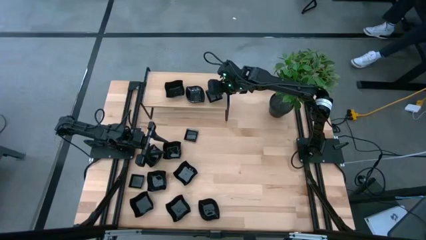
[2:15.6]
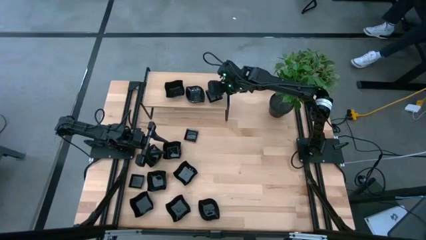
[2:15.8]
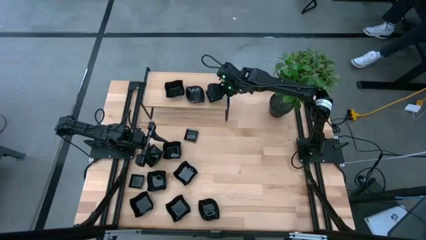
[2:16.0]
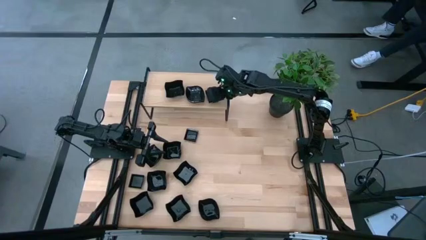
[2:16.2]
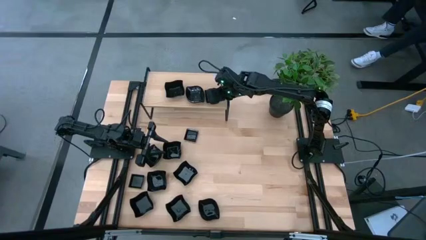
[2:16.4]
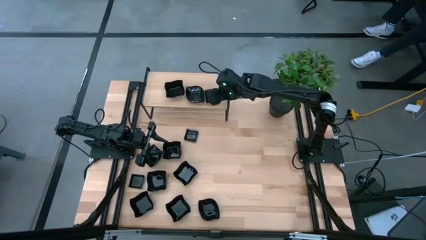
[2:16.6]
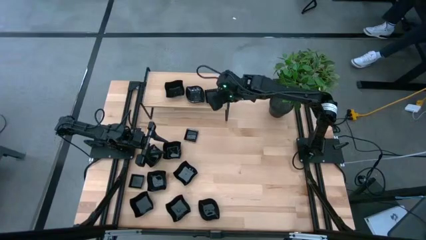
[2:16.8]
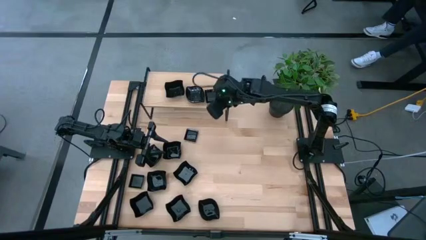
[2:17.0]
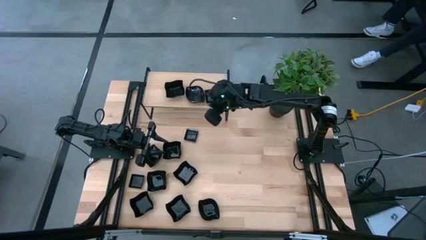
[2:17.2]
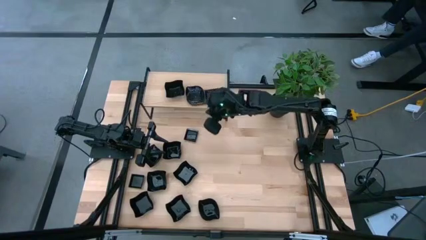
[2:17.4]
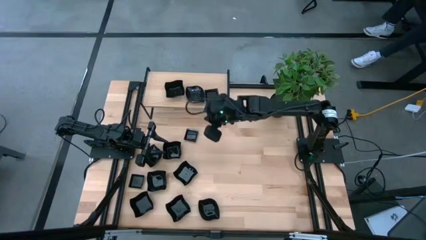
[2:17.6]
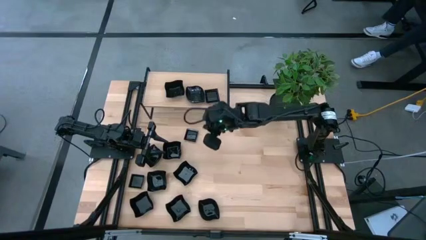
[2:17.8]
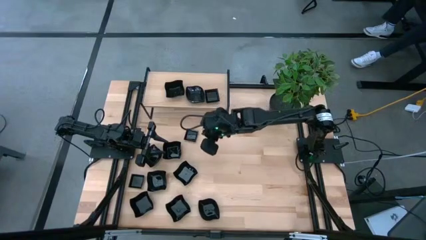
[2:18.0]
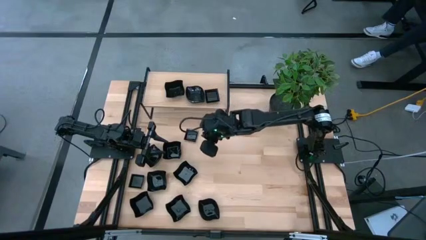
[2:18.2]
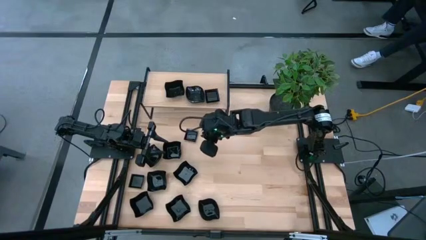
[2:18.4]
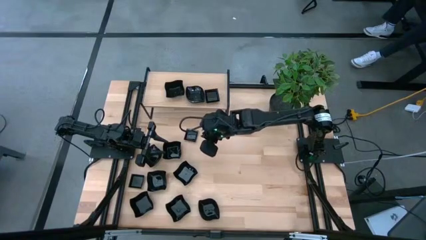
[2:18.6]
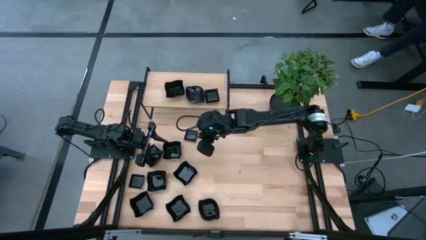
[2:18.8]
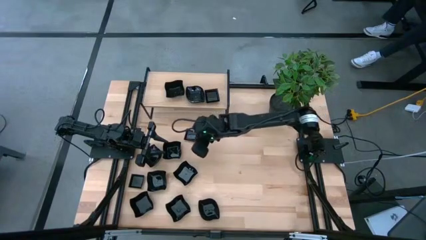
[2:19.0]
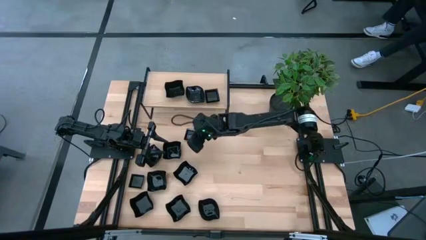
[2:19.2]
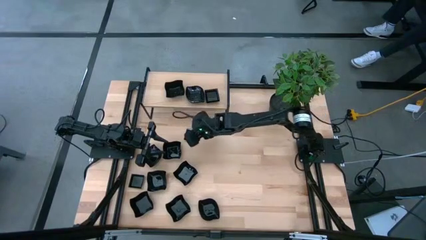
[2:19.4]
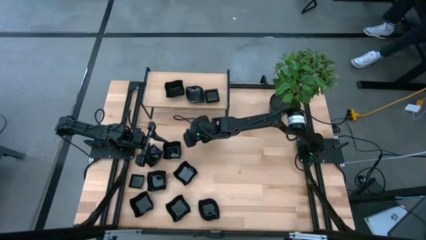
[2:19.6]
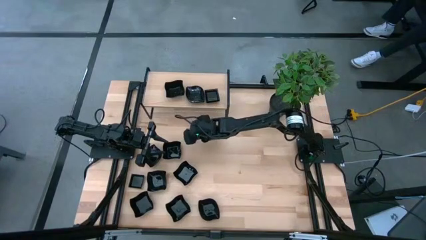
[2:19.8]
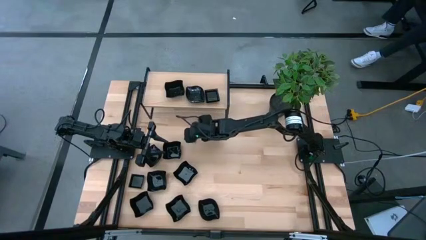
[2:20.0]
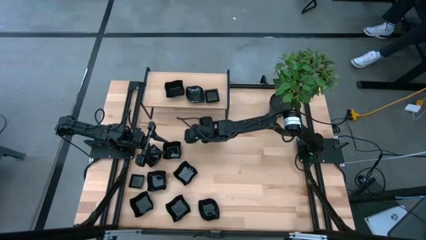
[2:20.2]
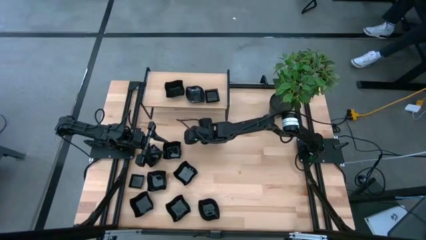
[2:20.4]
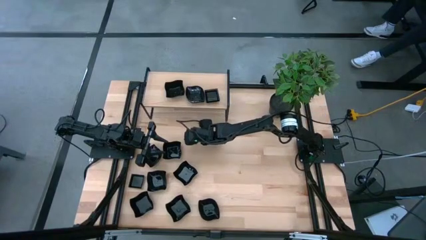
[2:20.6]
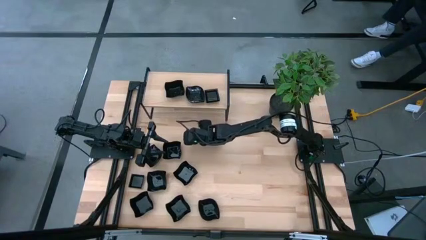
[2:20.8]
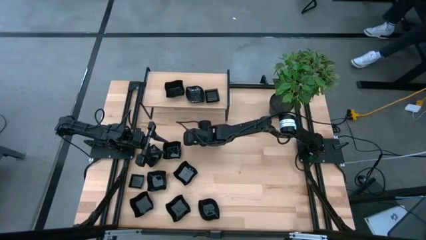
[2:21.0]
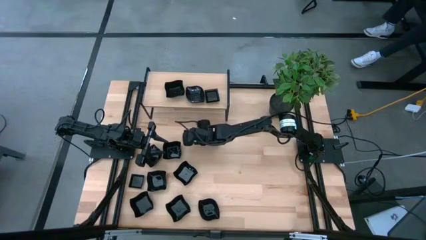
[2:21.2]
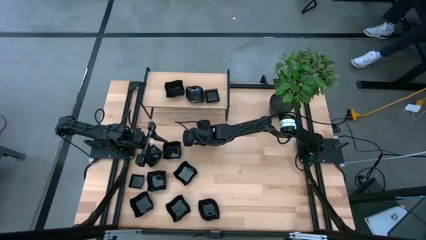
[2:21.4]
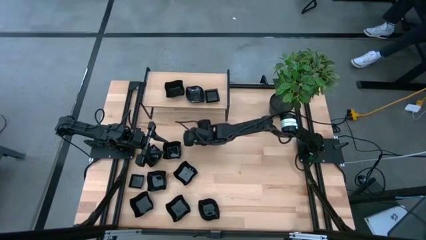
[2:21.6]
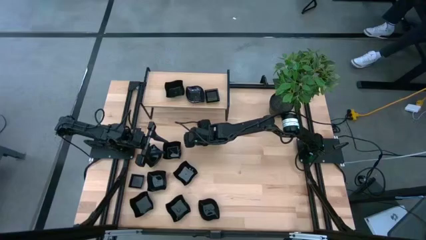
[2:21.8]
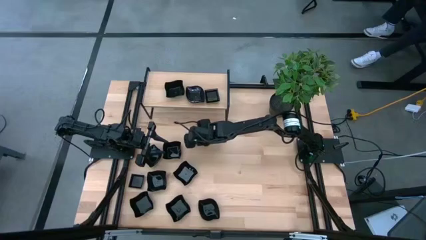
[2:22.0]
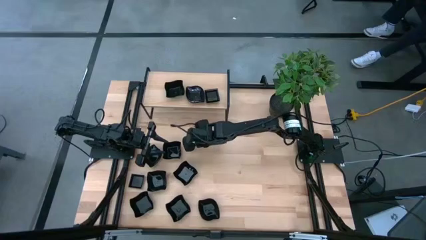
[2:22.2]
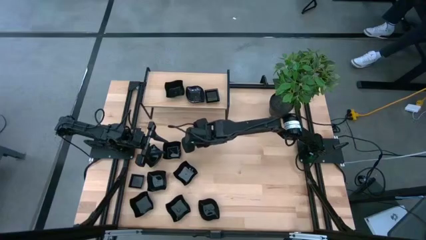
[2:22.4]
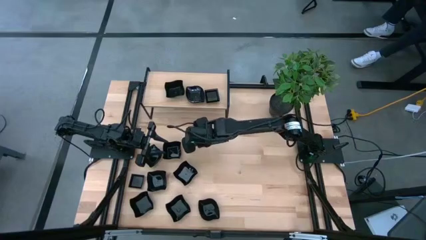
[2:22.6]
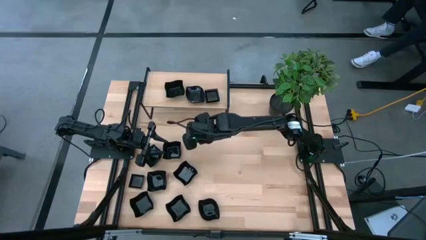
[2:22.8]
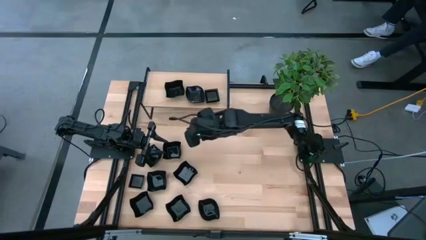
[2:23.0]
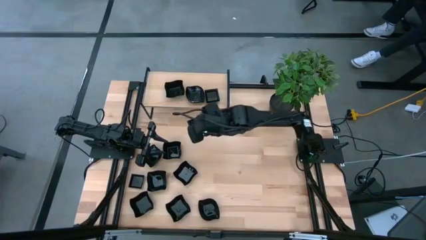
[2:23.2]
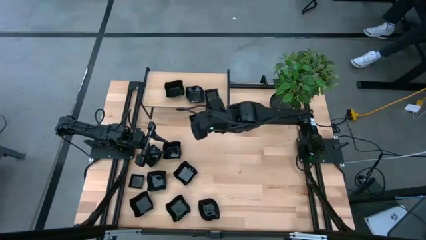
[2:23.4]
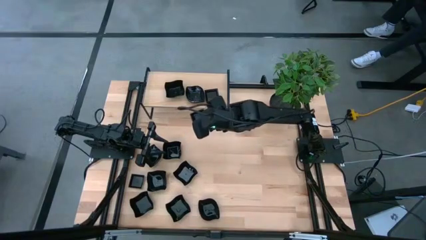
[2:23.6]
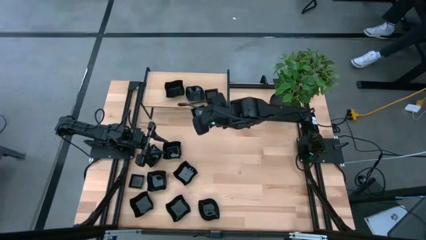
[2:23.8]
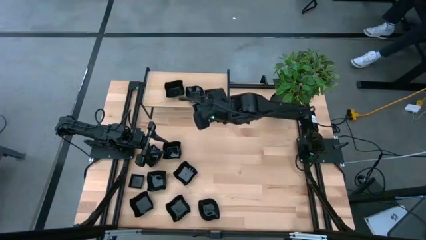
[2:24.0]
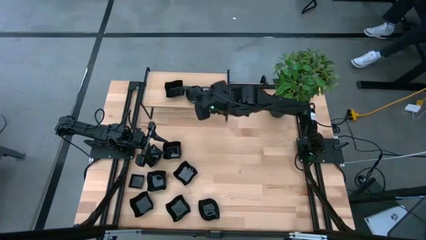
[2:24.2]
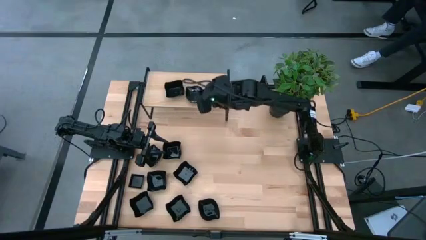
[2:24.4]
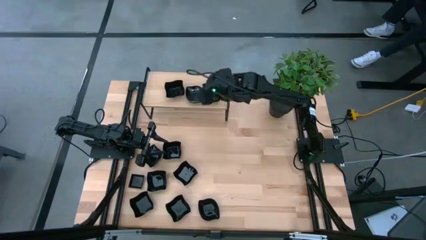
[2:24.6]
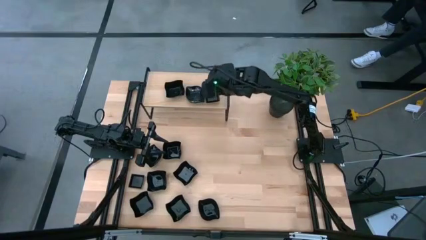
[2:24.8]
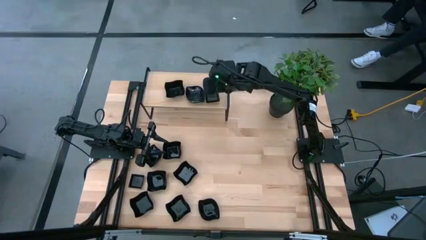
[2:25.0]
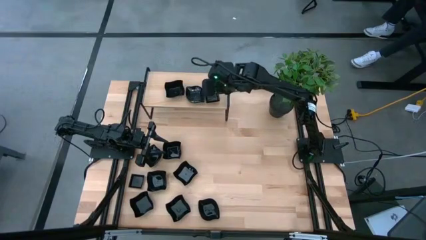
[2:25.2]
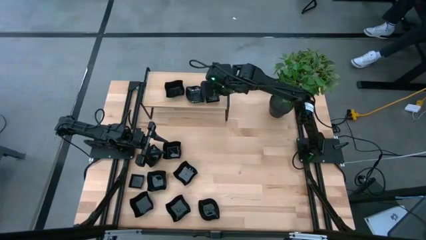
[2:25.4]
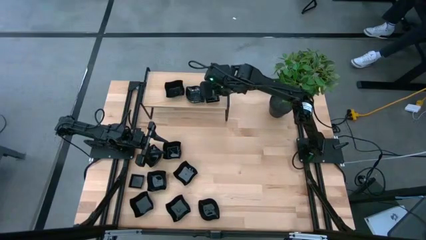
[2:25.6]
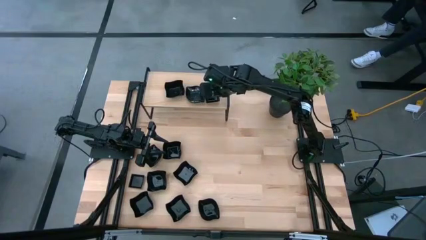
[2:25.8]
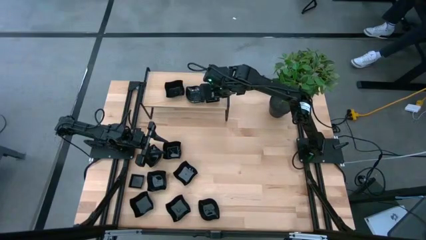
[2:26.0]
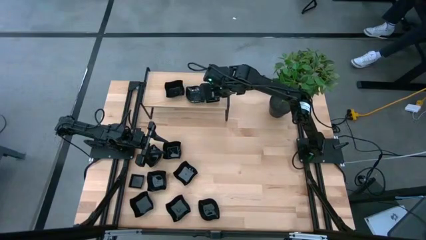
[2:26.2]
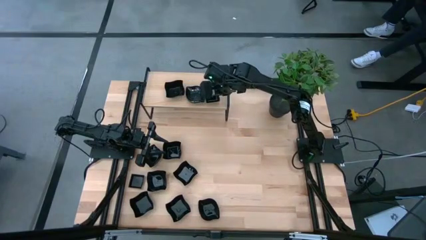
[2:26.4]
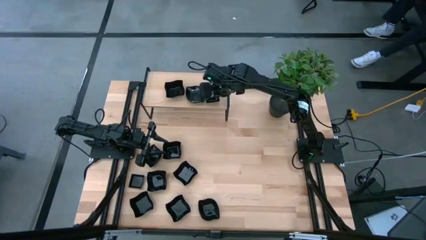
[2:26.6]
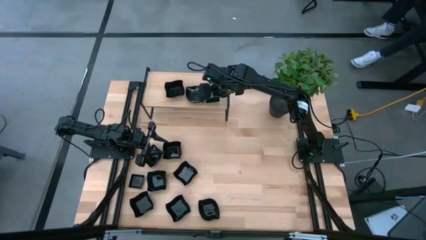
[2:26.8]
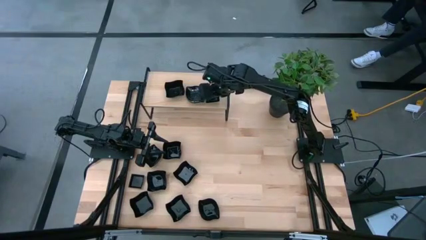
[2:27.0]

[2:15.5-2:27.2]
Task: Pick & Place Mini shaped plates
Stack the square plate on top of the square plates on the shelf

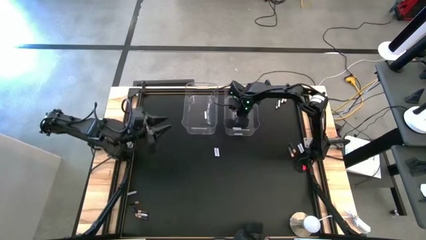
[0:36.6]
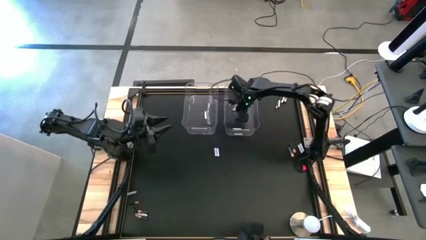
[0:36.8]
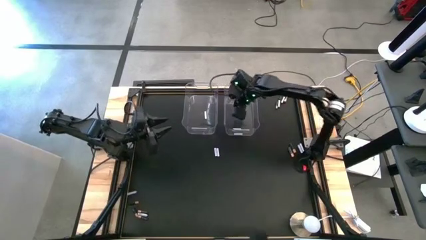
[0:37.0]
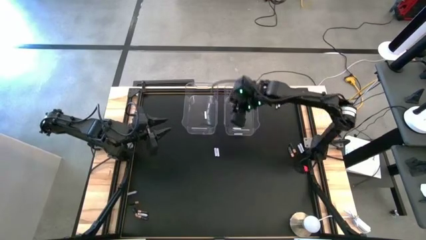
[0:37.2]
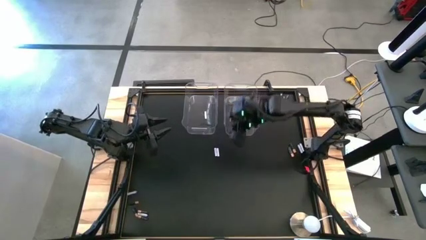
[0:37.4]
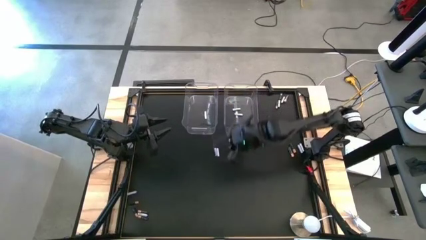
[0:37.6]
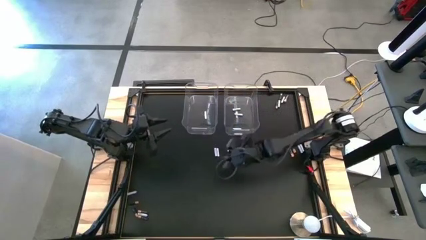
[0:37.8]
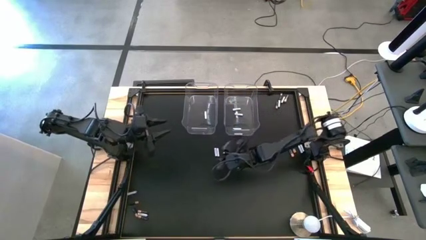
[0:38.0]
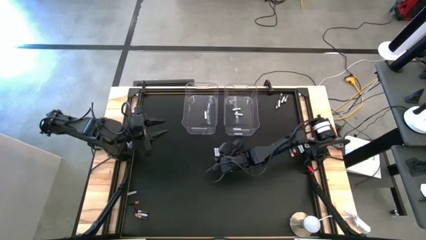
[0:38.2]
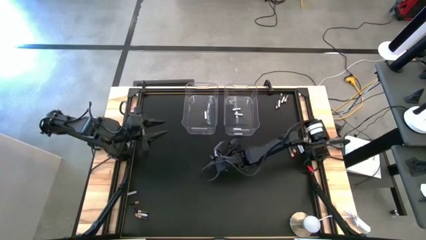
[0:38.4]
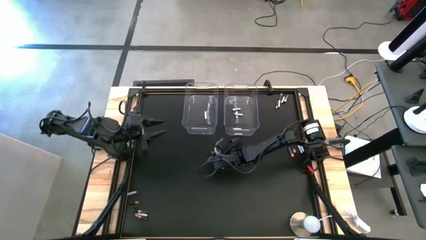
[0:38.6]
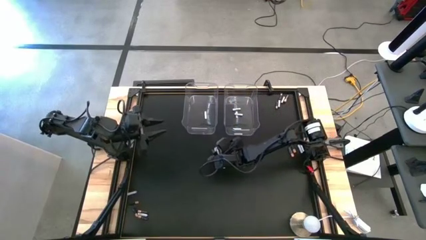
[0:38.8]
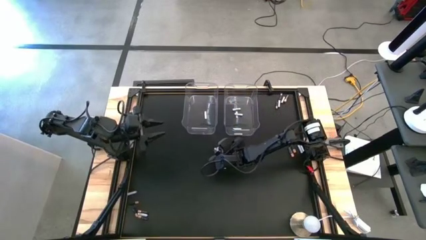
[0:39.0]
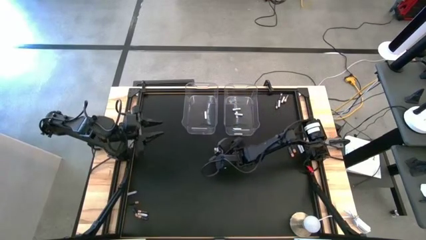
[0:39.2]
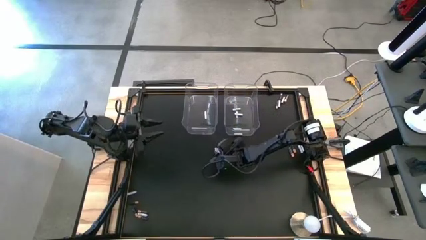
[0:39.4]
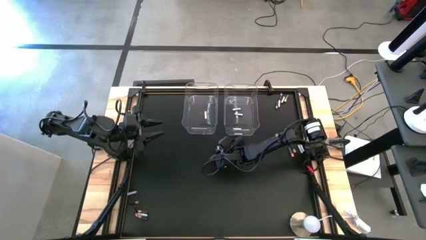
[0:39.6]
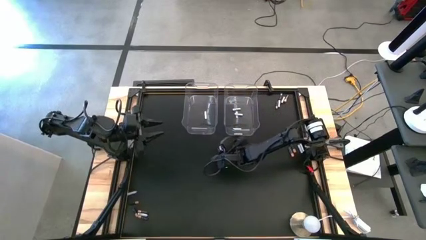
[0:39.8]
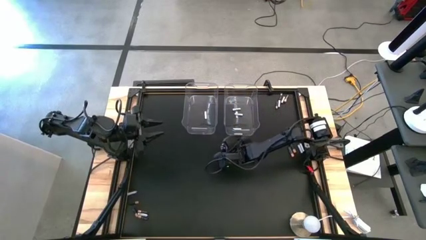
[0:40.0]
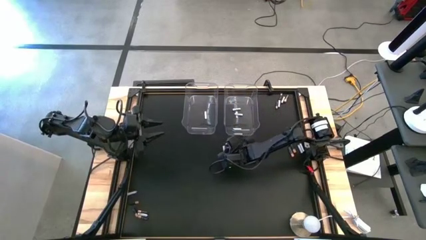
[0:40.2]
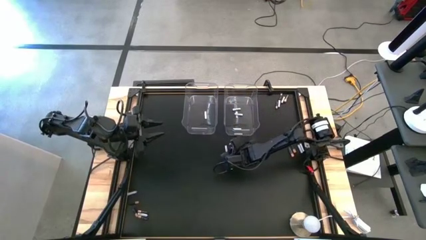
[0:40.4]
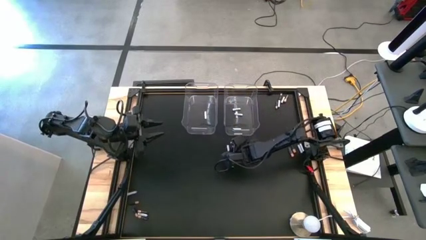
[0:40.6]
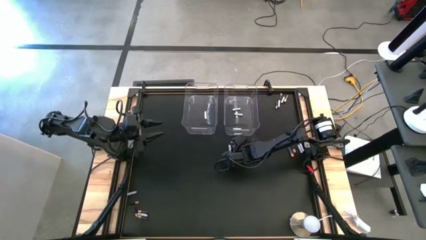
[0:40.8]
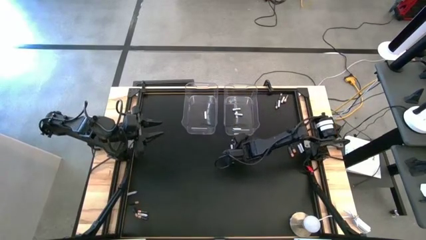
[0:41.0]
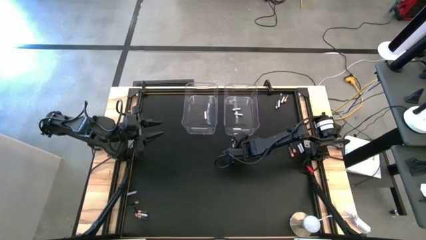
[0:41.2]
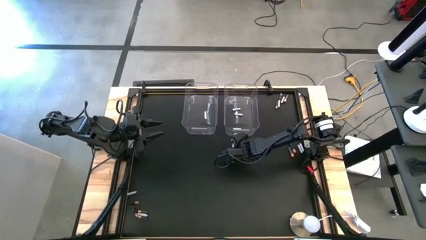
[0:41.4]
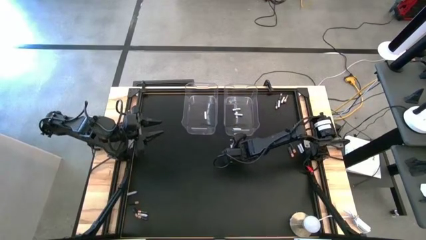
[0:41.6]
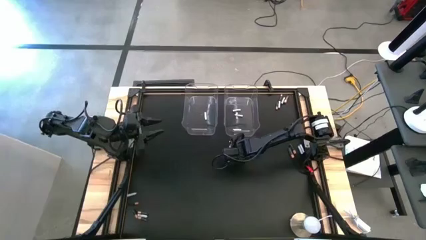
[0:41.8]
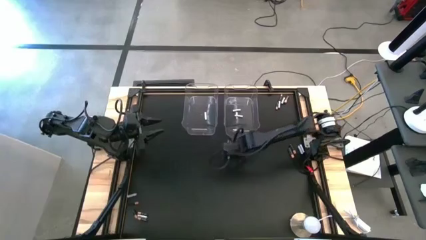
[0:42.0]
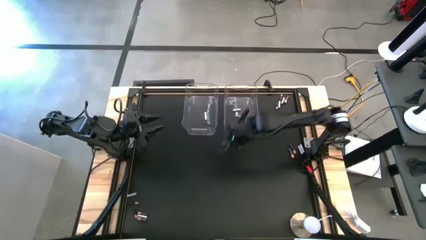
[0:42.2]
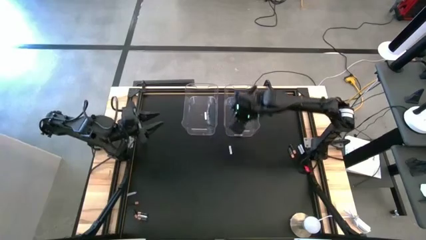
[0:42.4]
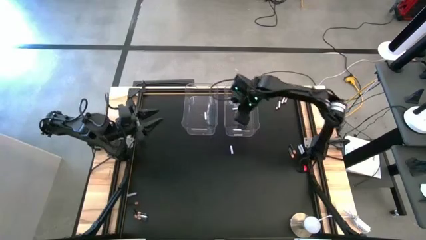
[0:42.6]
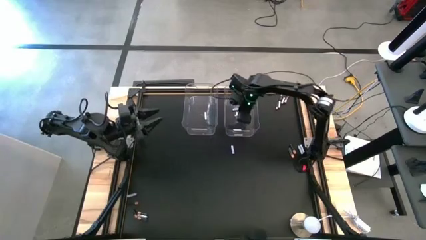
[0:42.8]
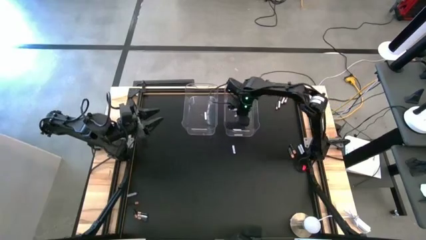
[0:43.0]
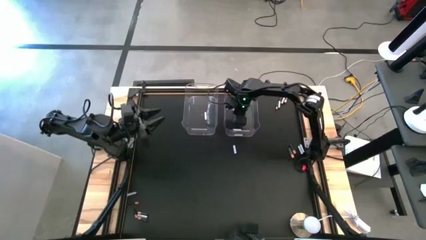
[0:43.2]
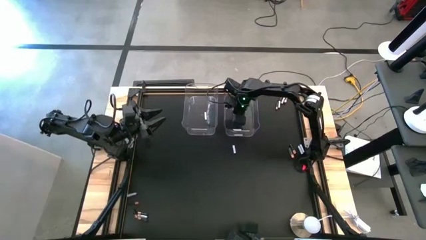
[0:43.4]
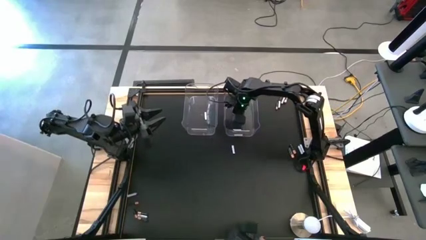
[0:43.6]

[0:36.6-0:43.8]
Task: Sort batteries
Put the white battery into the right transparent bin
